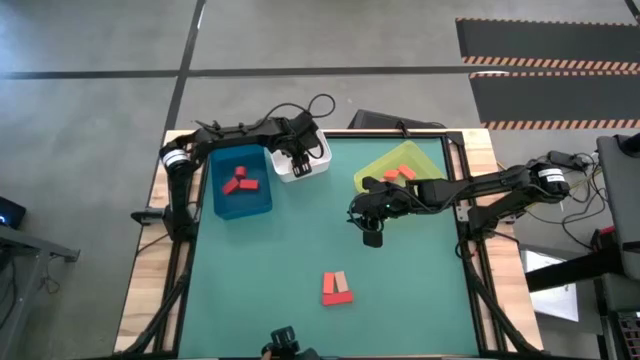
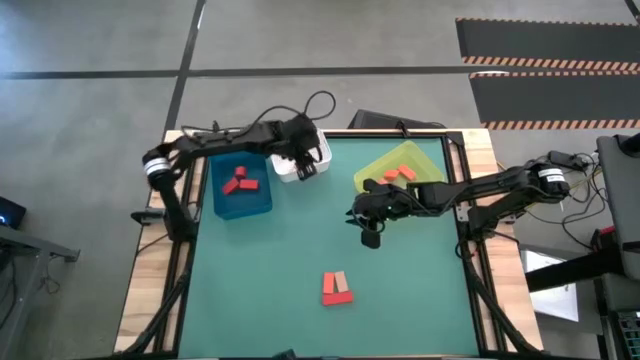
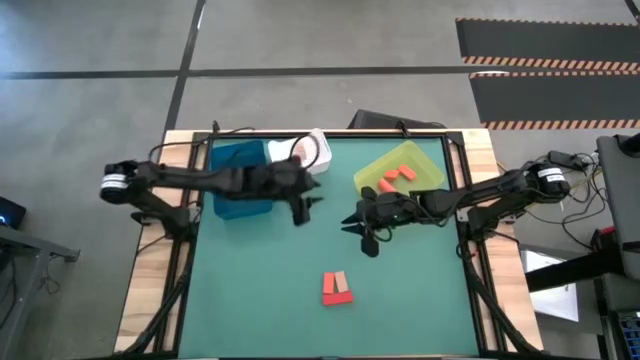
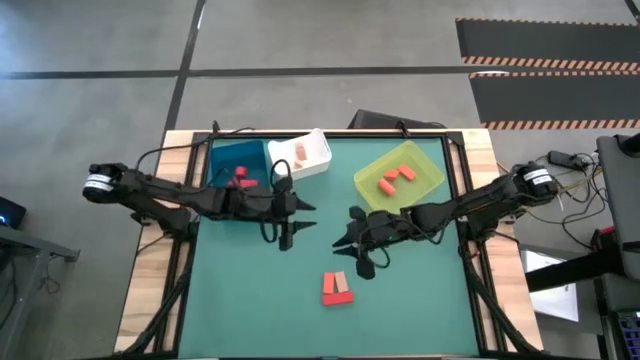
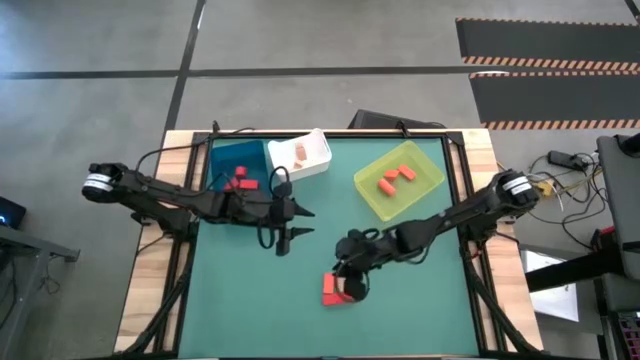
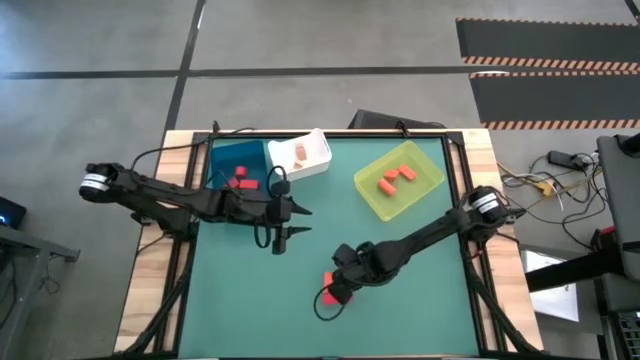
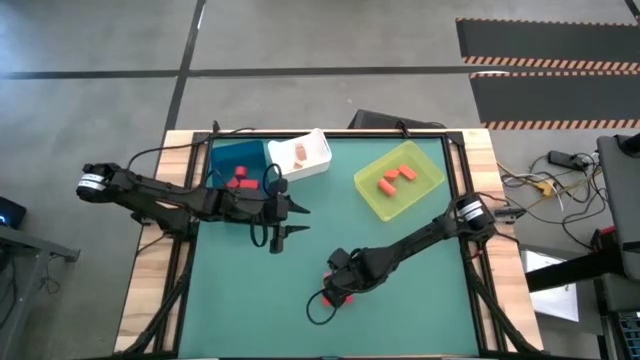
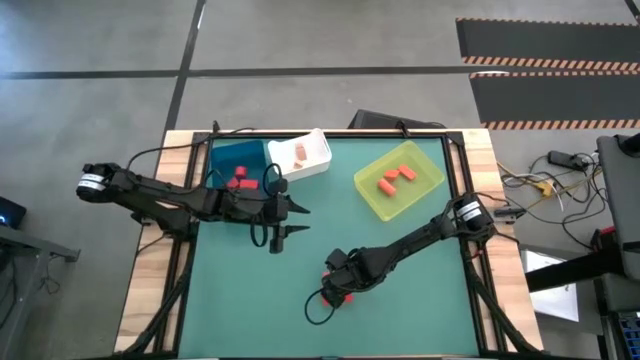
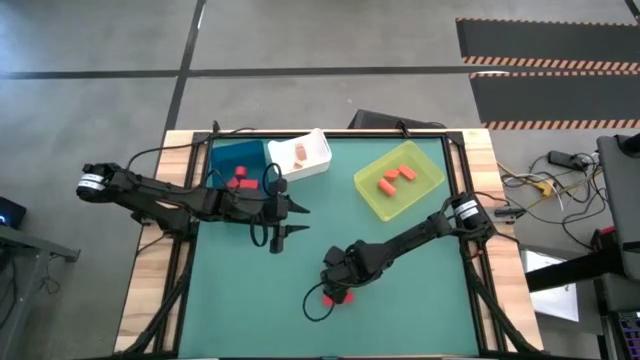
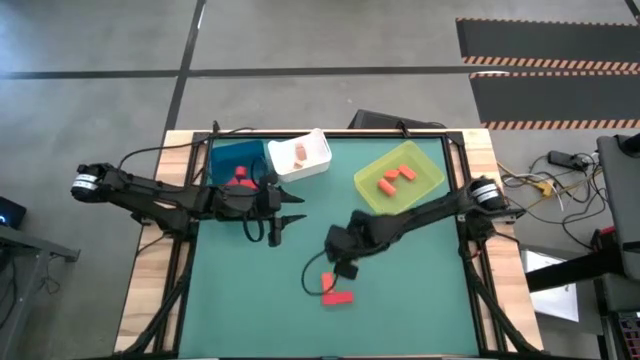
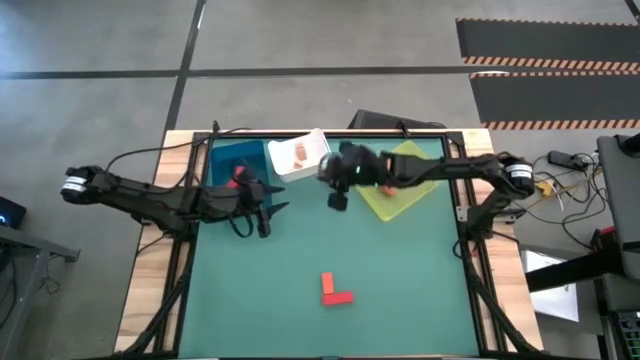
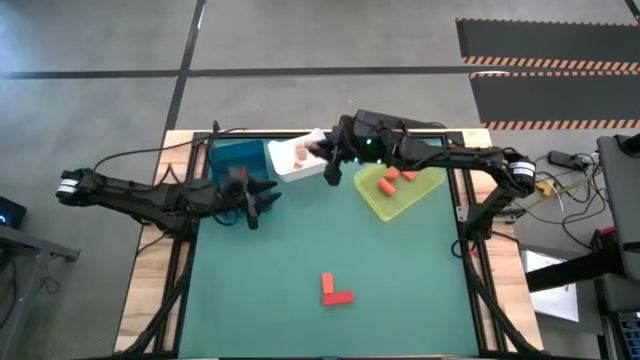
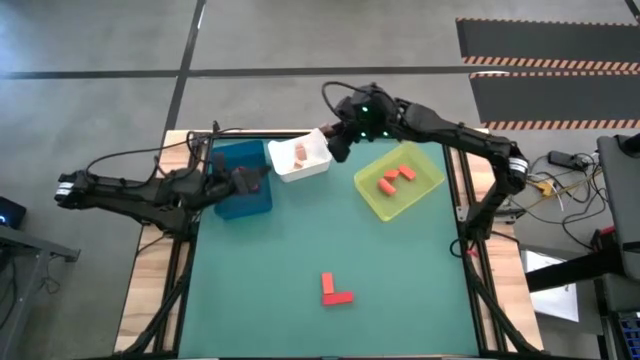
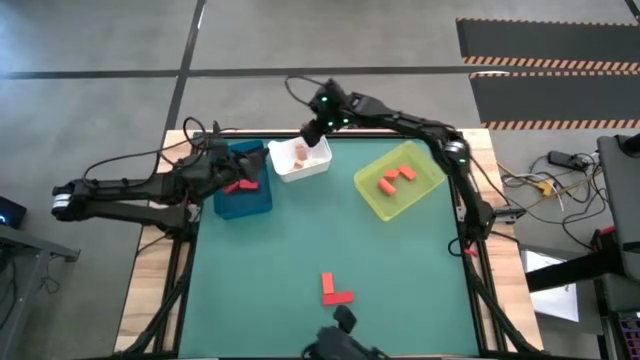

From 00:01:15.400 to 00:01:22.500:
Task: Sort & place blocks by color
Put the brown block into the white bin

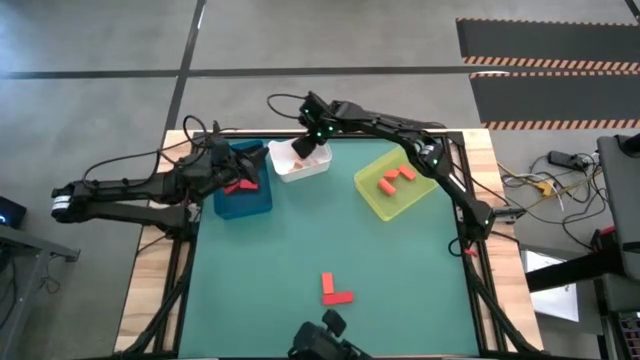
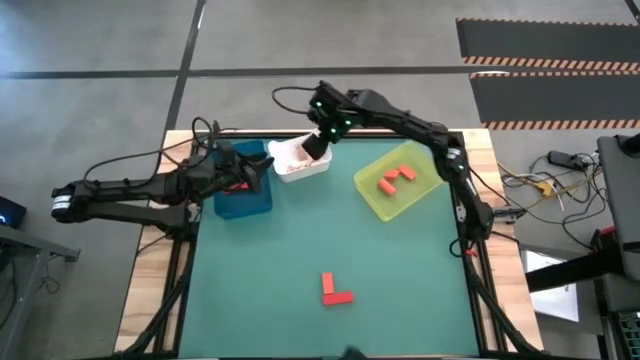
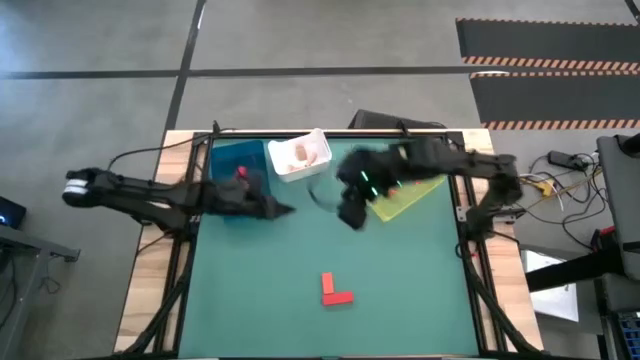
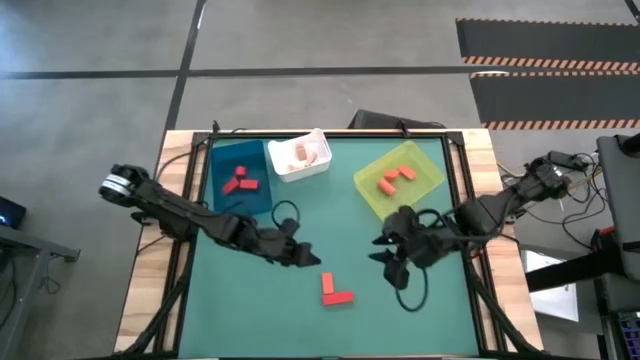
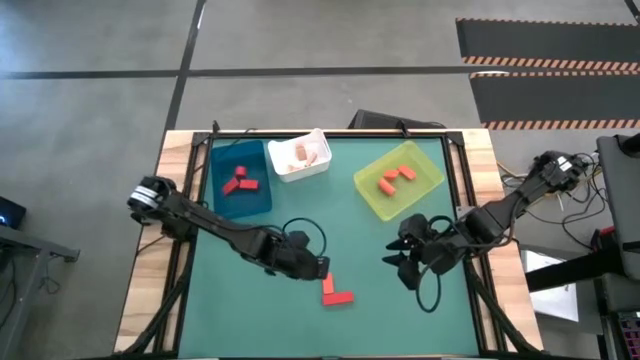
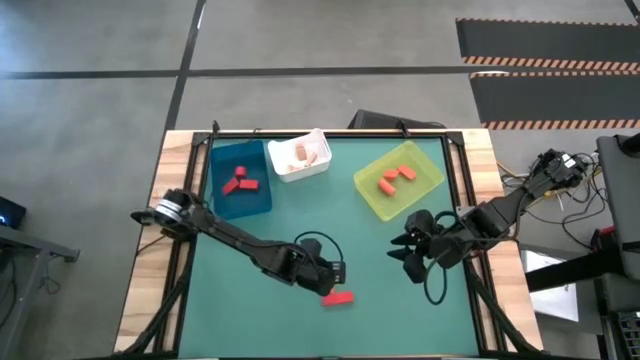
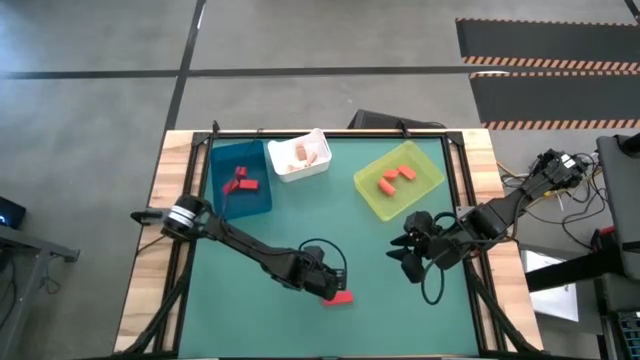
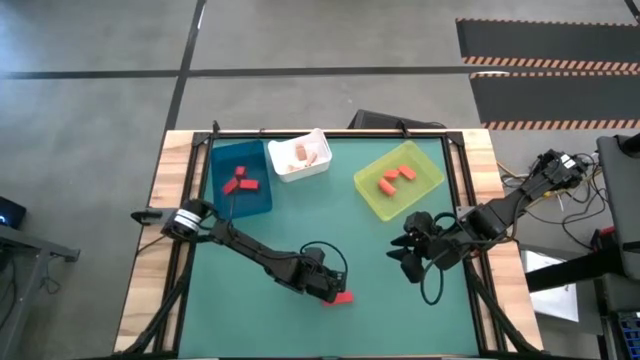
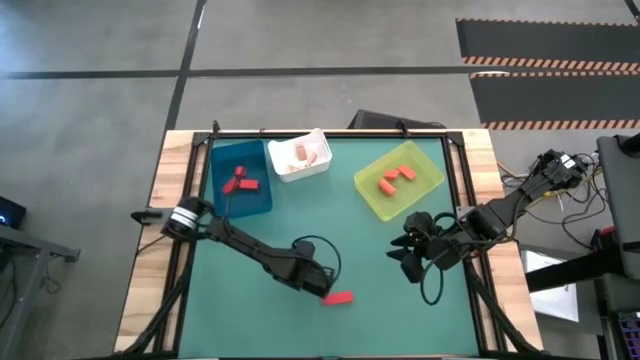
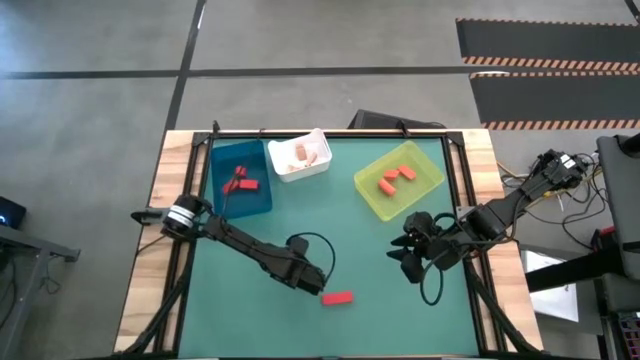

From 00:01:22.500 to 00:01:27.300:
Put the orange block into the yellow bin

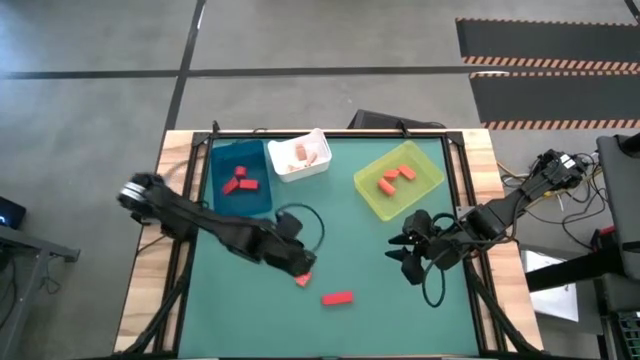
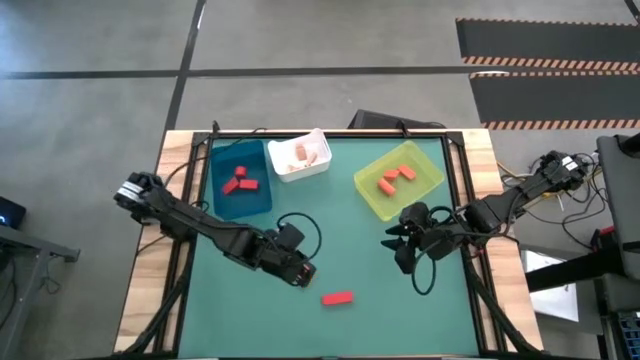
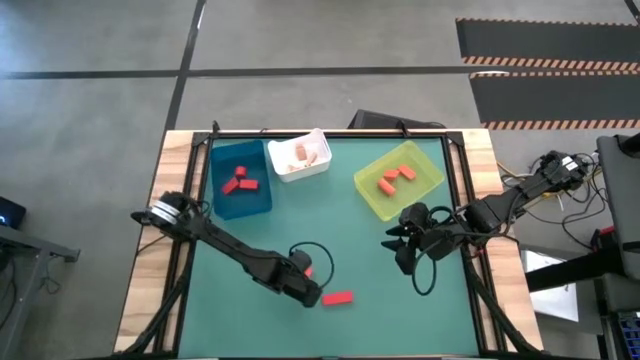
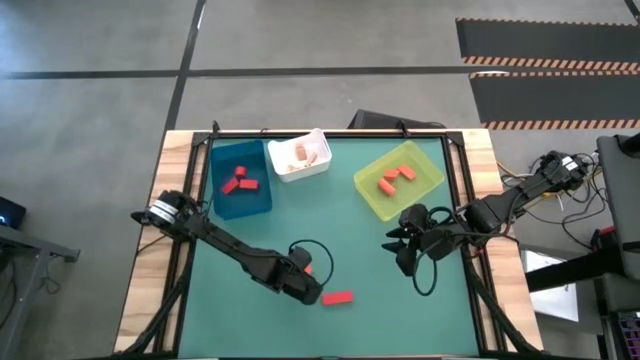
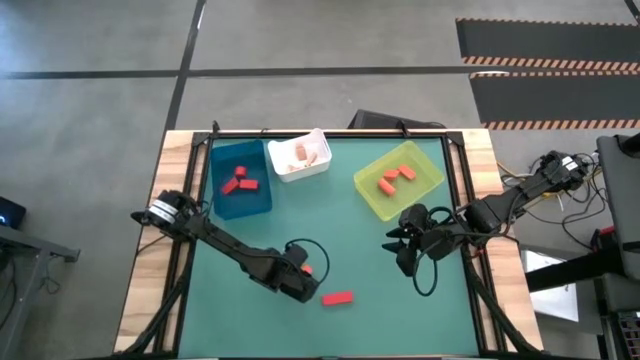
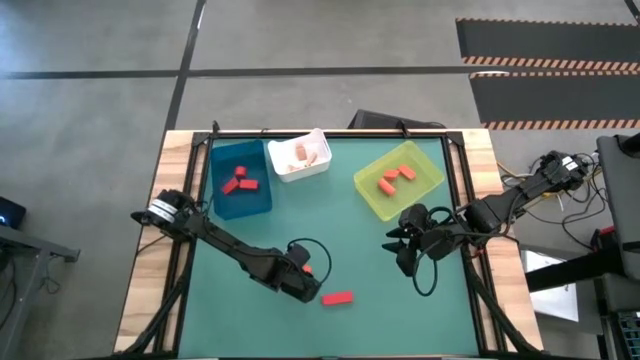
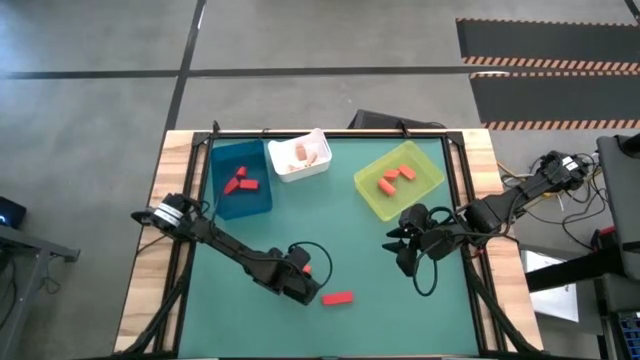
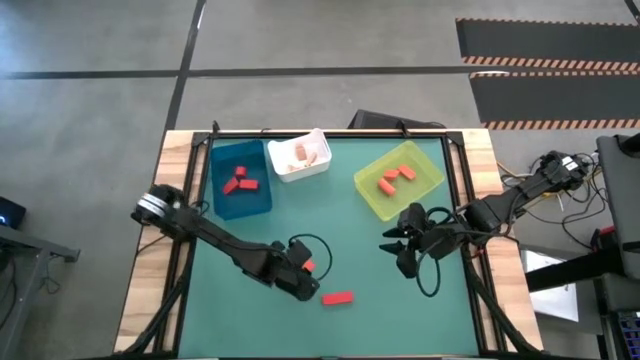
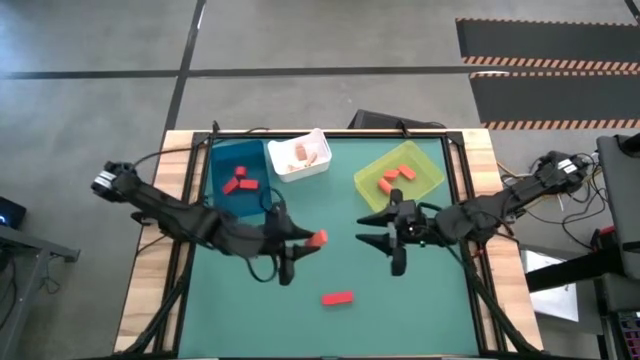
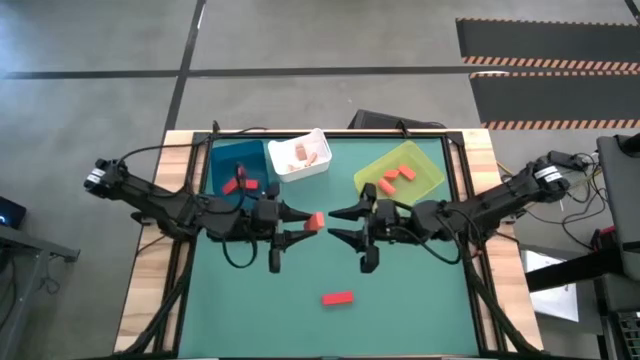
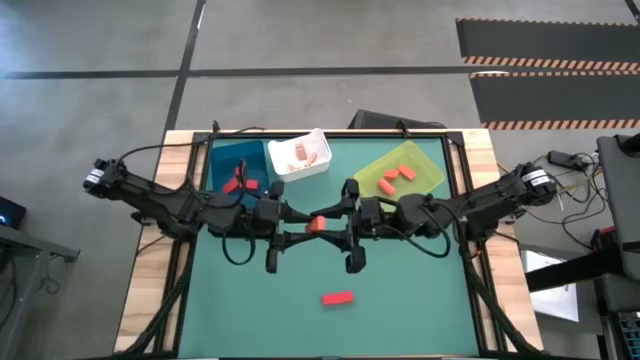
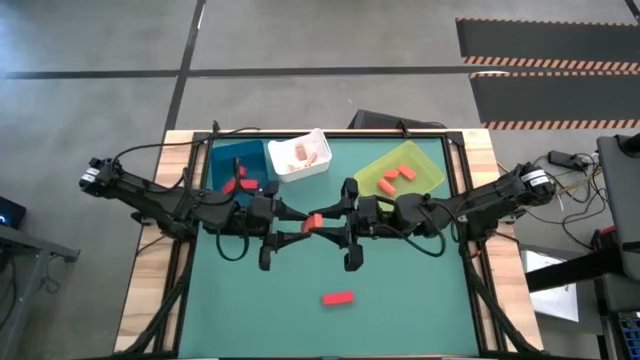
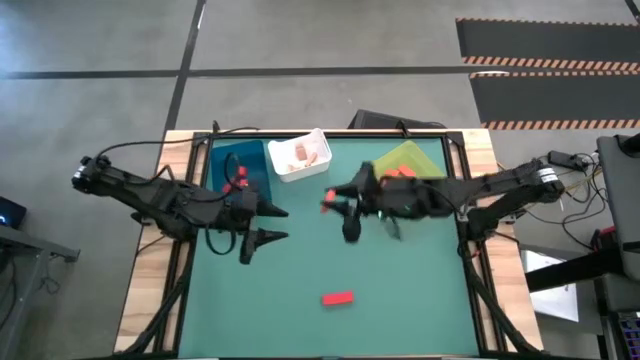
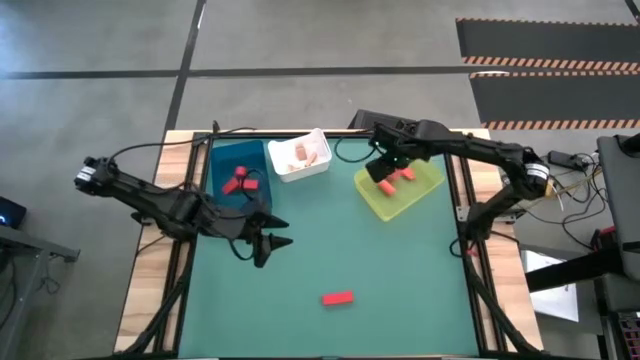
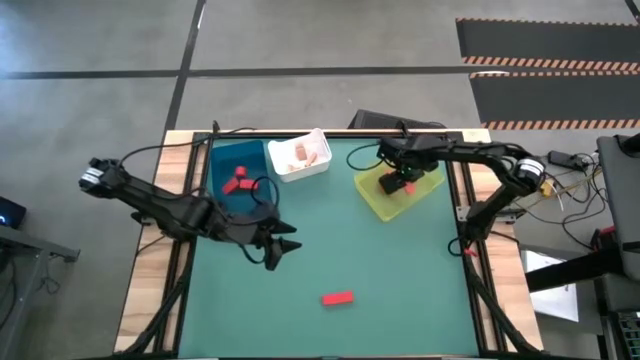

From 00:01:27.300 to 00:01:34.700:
Put the orange block into the yellow bin

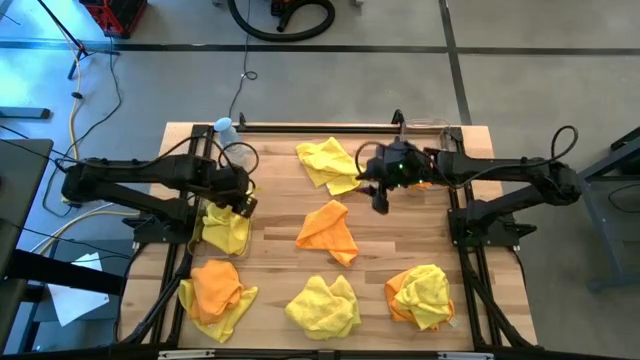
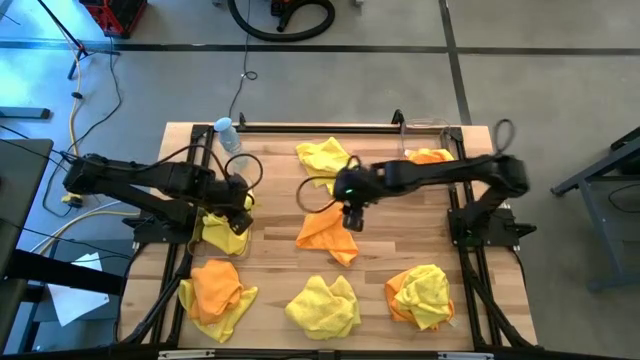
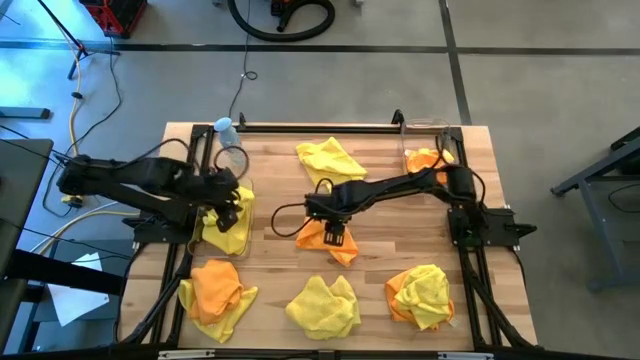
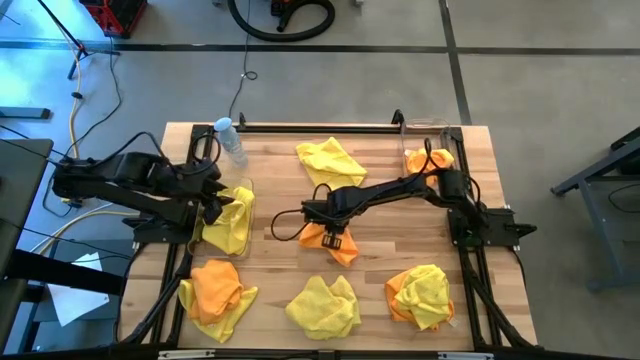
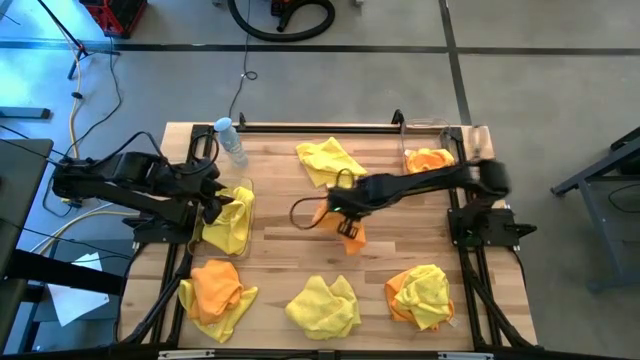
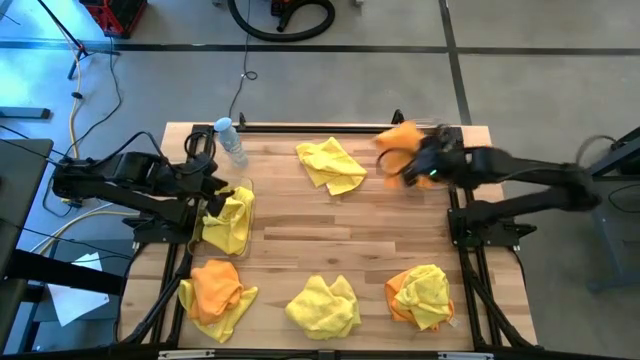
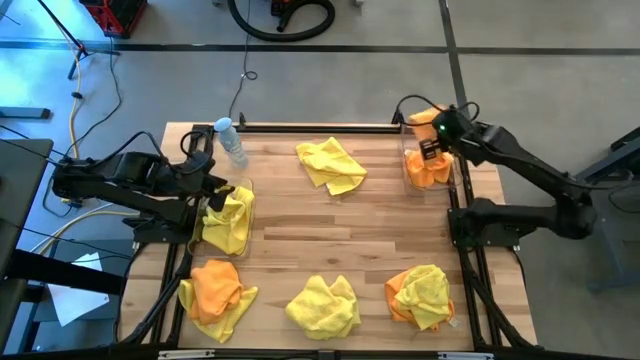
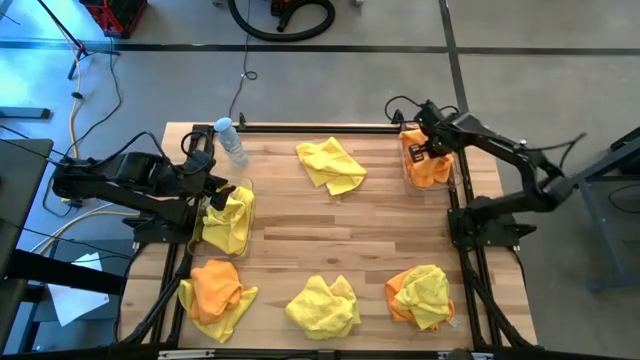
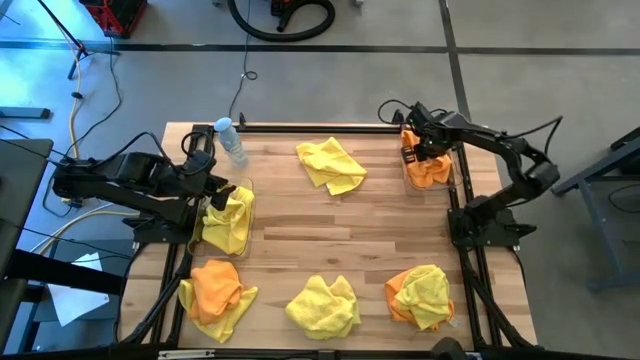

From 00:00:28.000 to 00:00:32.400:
Task: Sort microfiber towel by color & place in baskets
Put the orange microfiber cloth into the right transparent bin
